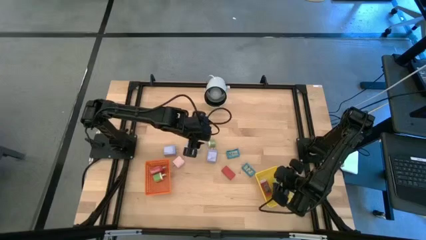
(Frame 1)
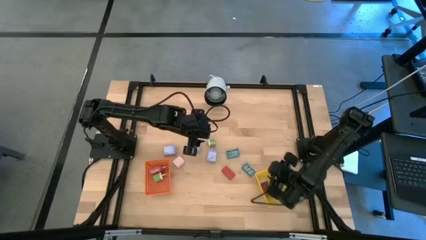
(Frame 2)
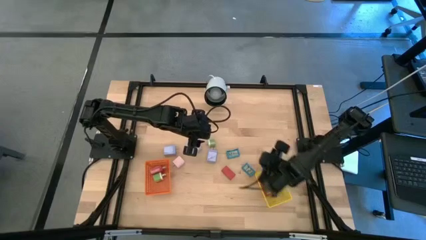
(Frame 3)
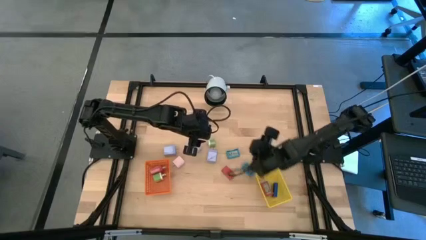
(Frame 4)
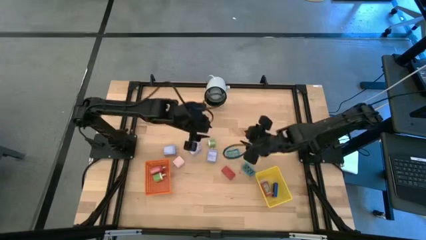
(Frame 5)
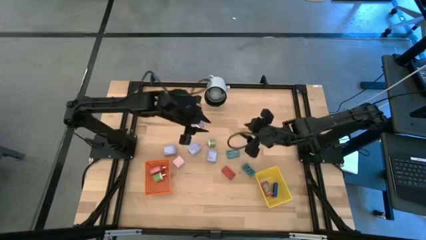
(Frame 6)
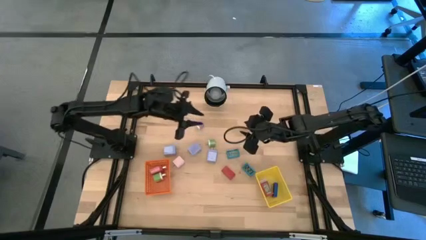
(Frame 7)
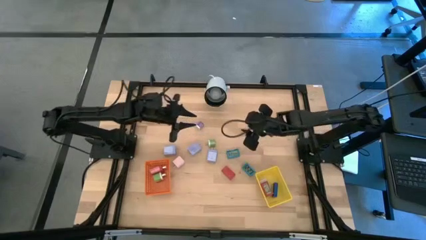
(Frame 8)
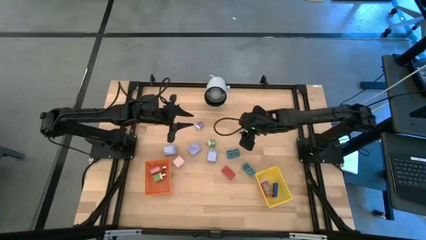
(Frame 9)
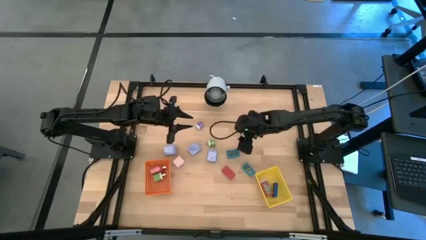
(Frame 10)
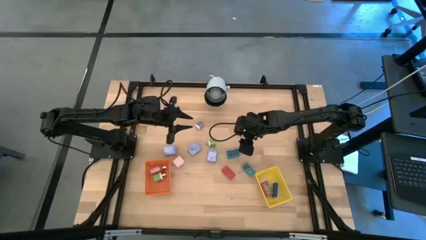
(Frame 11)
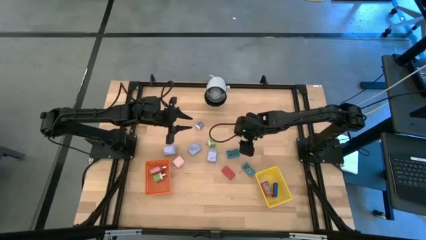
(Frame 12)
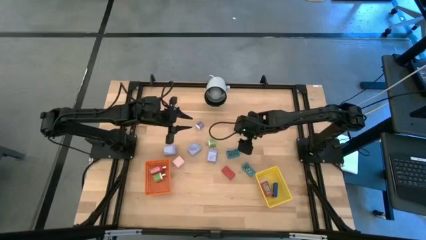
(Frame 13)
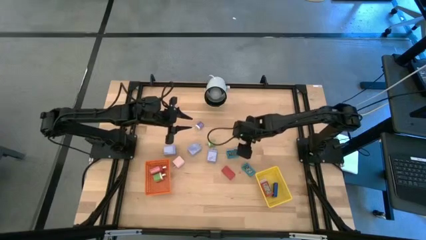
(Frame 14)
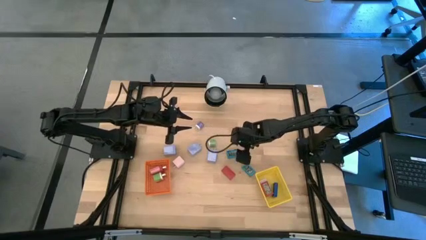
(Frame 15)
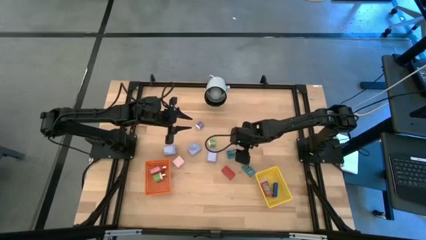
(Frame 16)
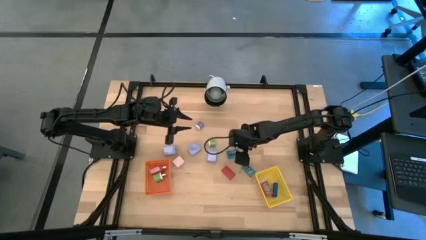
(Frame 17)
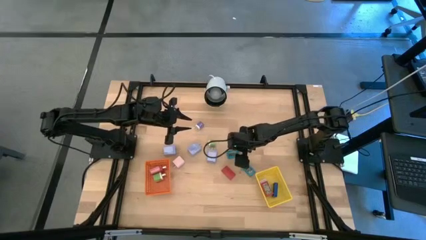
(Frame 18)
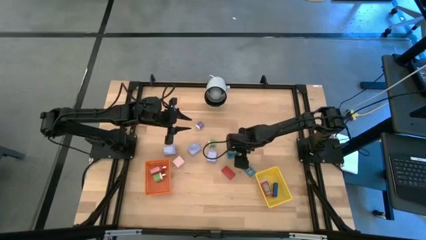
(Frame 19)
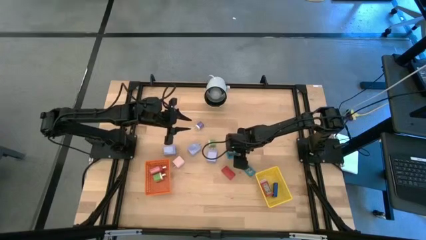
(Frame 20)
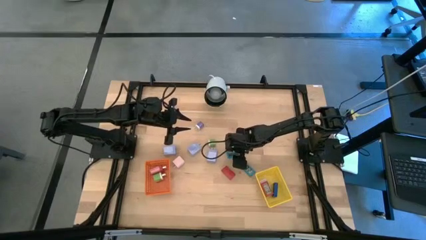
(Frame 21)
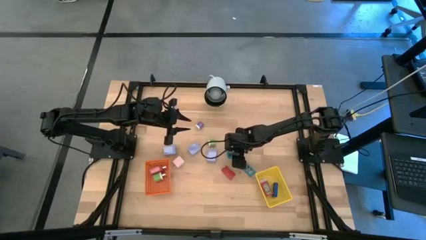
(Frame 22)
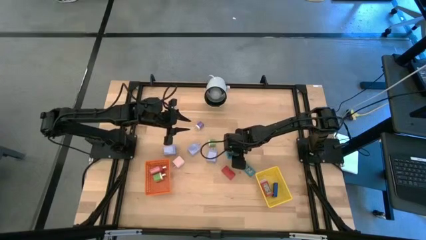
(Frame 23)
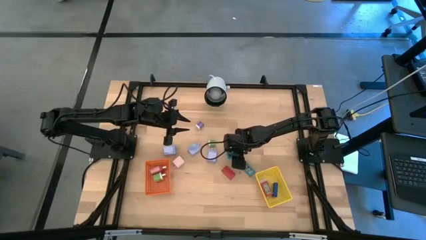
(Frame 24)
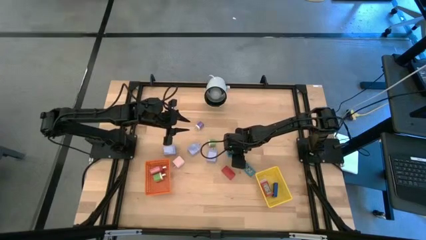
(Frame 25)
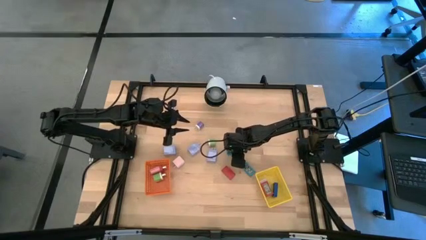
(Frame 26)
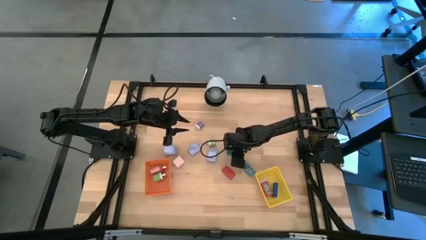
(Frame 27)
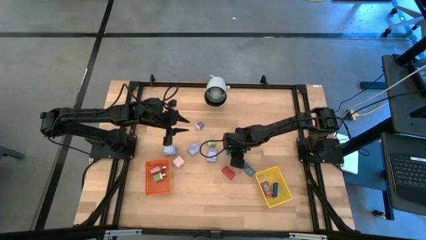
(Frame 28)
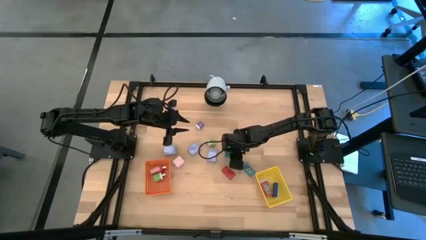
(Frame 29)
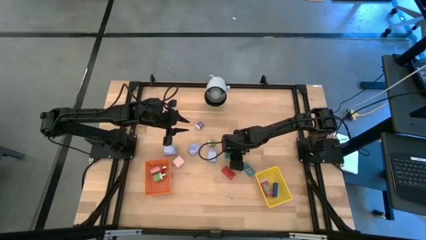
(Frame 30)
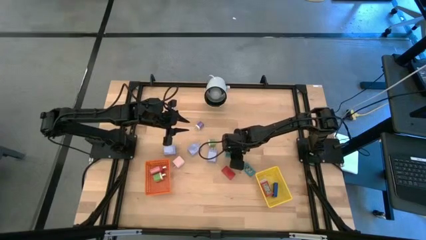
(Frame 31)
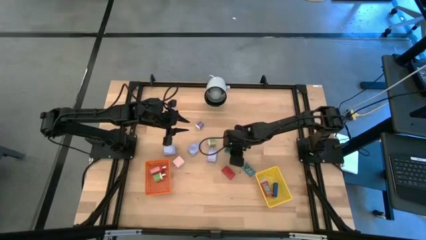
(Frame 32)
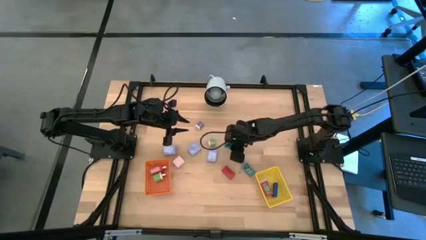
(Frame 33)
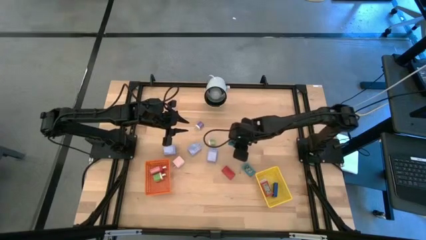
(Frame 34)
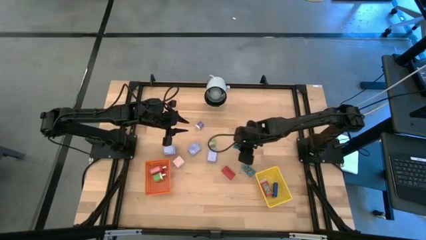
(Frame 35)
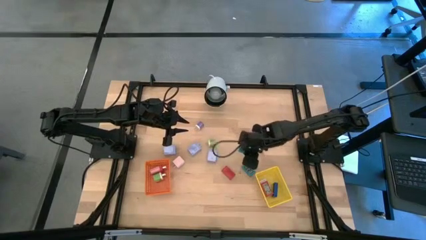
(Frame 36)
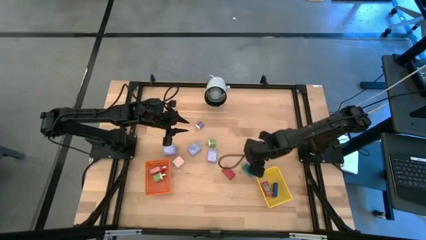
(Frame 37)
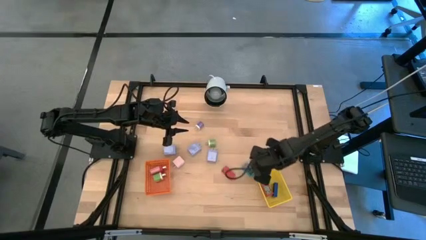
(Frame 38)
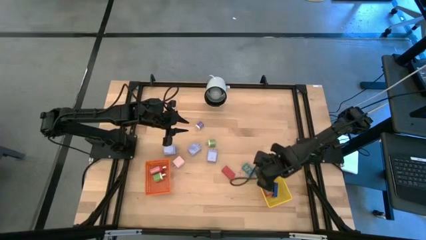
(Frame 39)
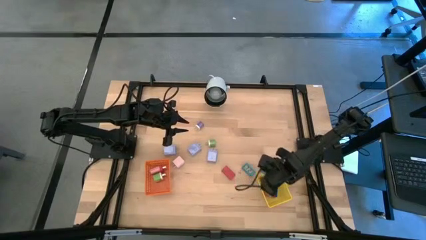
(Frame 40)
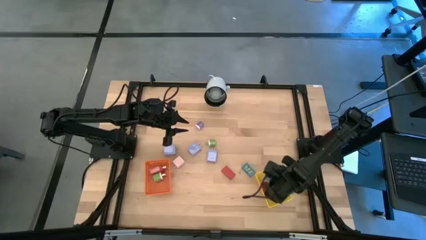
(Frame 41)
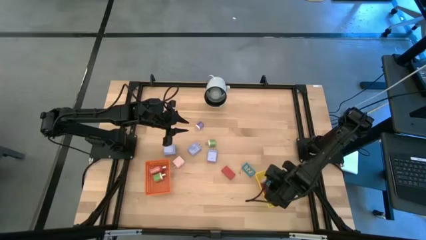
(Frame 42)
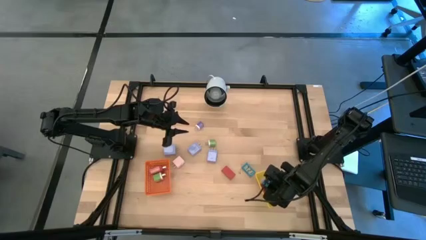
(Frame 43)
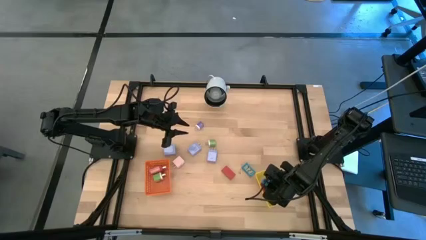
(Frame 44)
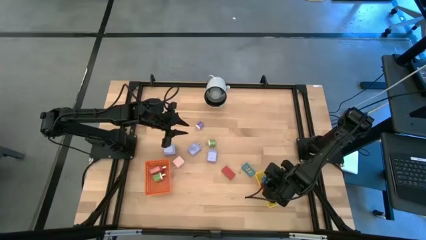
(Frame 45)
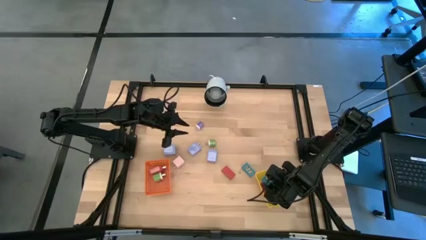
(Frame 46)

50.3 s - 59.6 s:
Task: Pick & Place Office items
Put the top light blue digital clock into the yellow basket

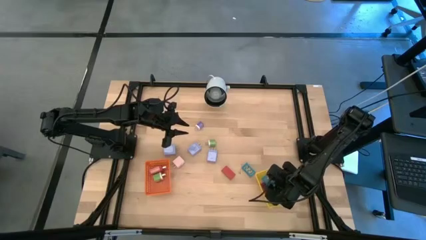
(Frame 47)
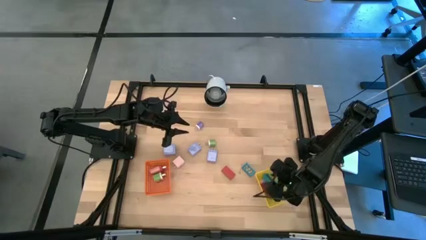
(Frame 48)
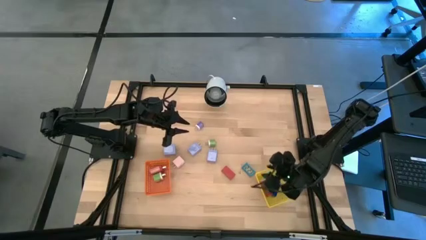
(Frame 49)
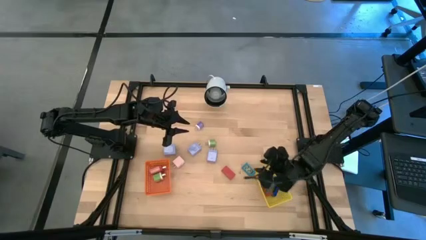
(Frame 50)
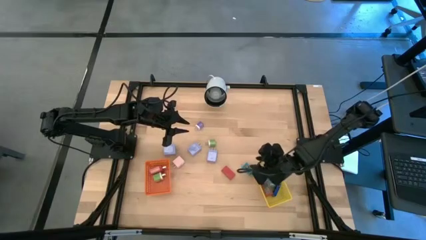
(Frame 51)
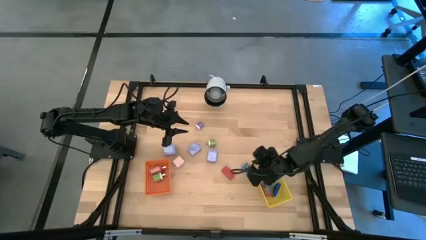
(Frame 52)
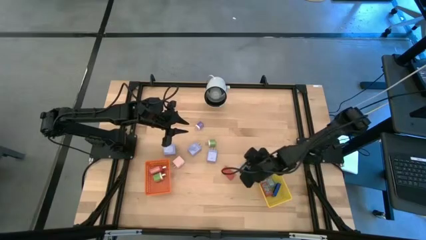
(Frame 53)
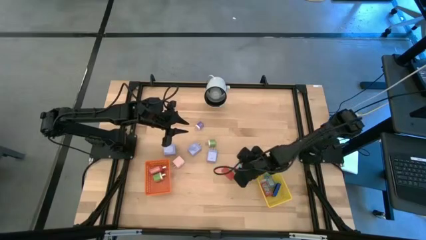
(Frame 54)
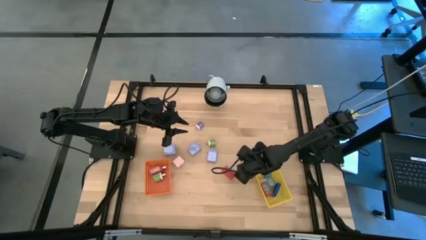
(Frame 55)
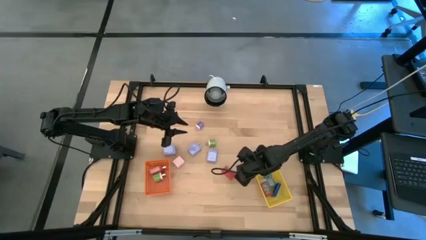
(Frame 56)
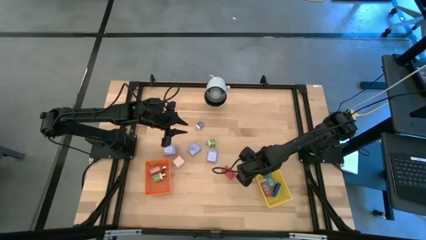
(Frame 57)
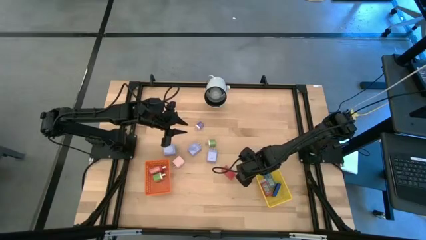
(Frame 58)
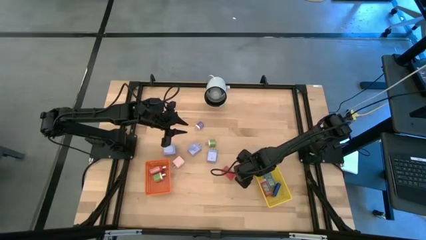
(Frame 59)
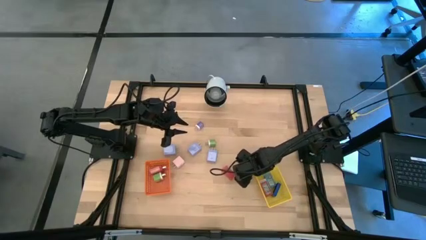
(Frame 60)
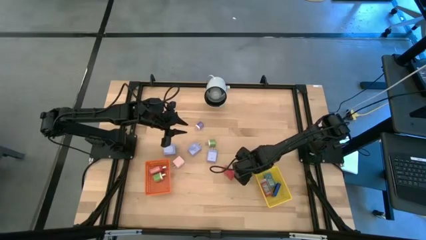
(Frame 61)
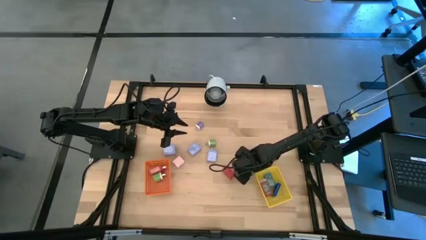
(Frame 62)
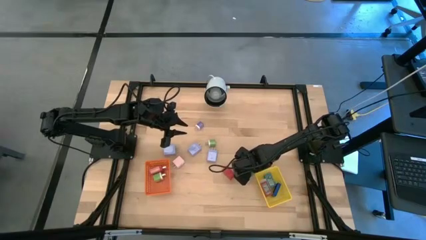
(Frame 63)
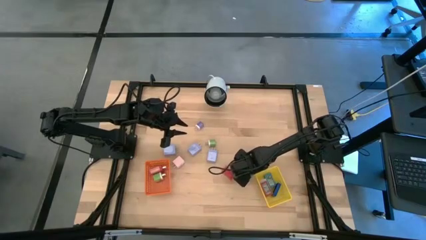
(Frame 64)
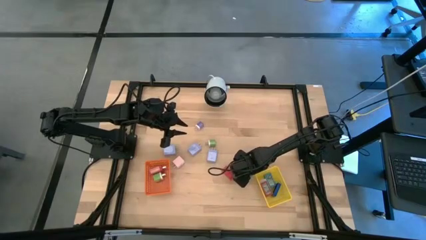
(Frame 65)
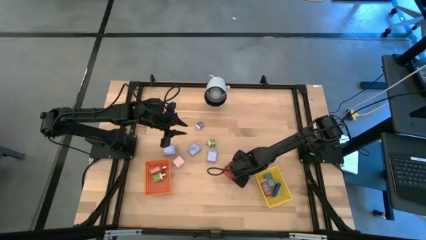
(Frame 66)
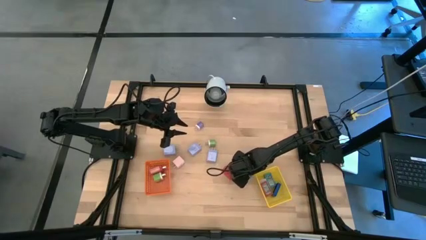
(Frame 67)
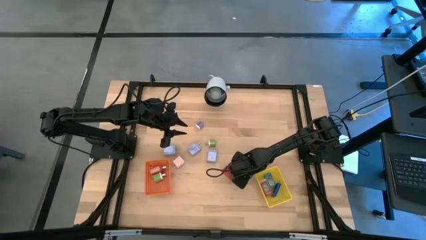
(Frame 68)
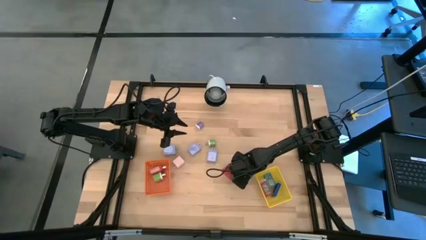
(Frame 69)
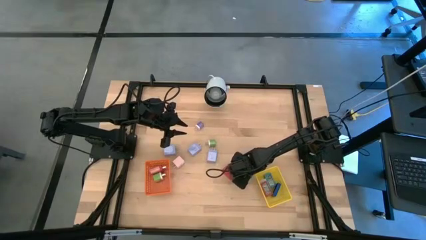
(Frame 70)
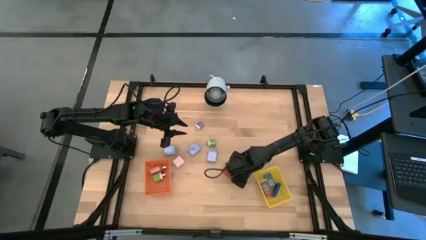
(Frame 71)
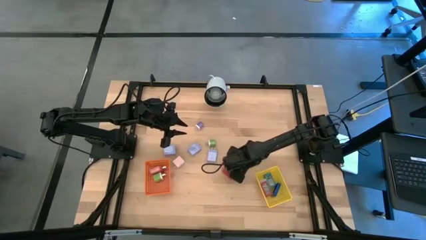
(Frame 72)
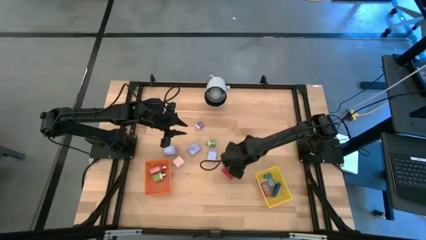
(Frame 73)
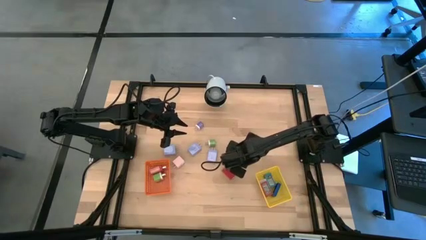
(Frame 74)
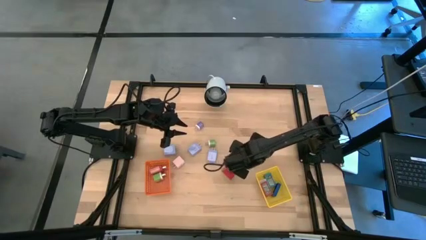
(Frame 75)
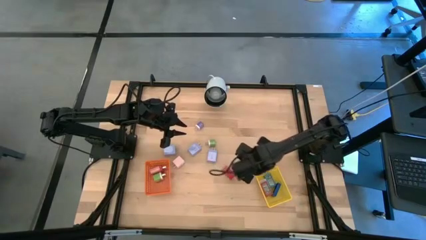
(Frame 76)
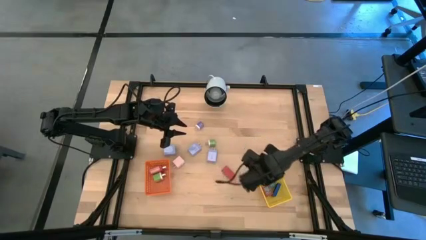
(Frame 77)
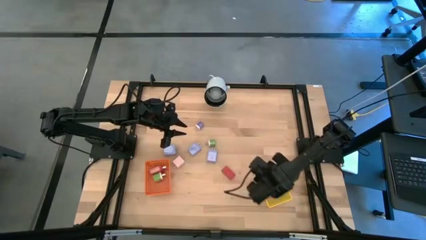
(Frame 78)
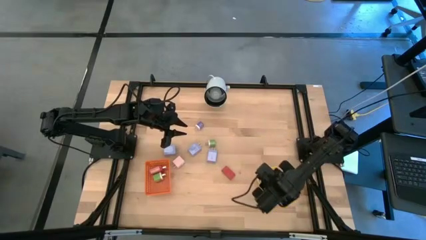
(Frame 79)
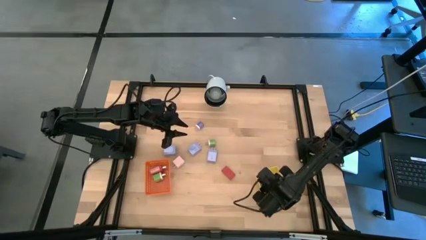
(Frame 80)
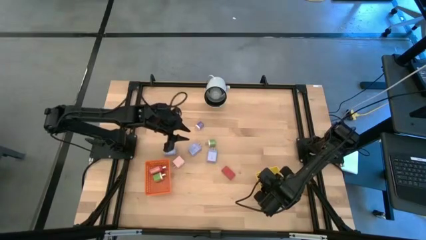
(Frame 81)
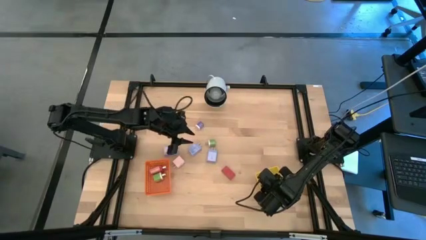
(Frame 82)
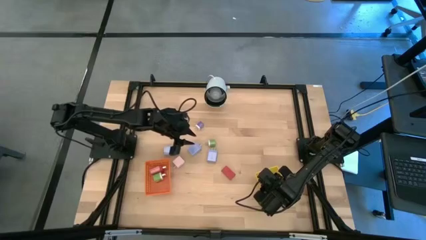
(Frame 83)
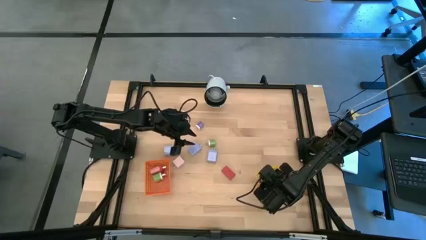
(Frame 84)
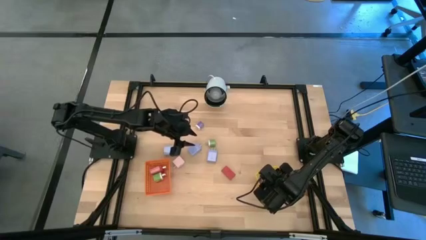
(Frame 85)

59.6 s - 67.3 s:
Put the light blue digital clock into the yellow basket
